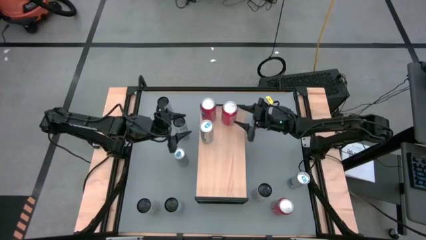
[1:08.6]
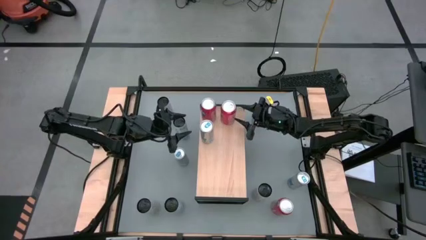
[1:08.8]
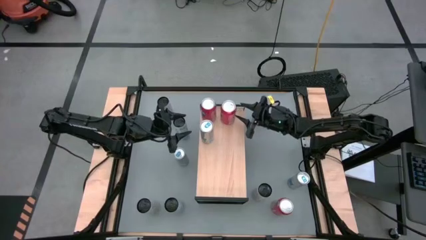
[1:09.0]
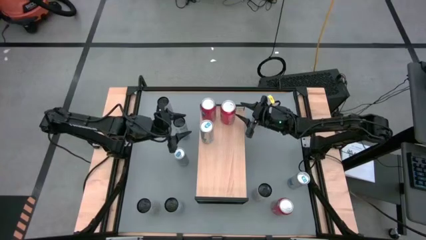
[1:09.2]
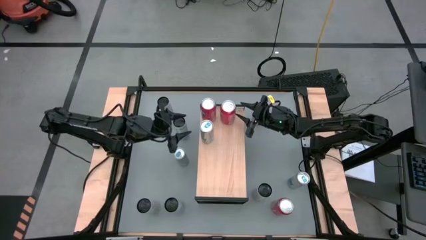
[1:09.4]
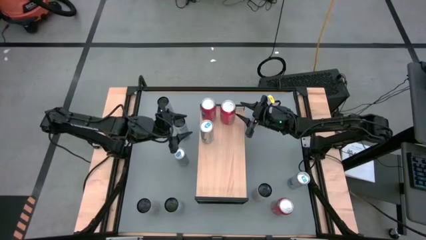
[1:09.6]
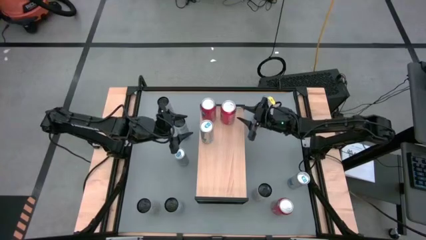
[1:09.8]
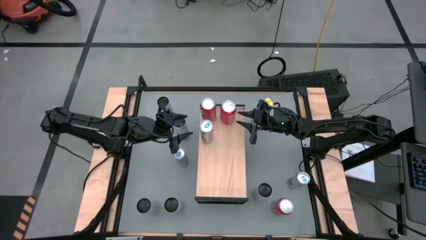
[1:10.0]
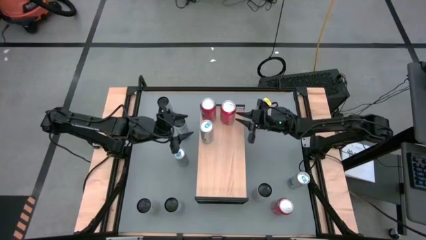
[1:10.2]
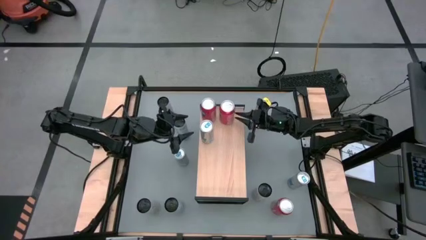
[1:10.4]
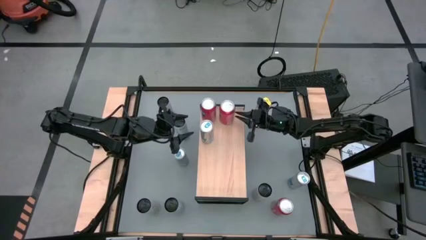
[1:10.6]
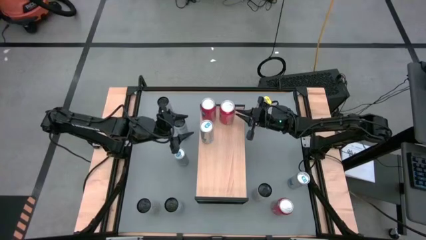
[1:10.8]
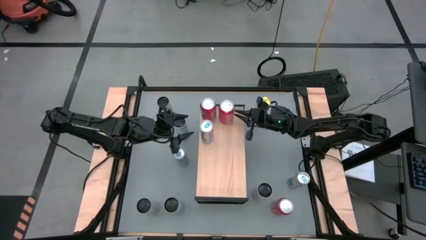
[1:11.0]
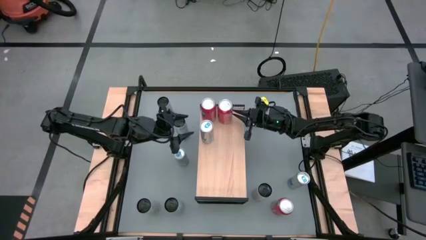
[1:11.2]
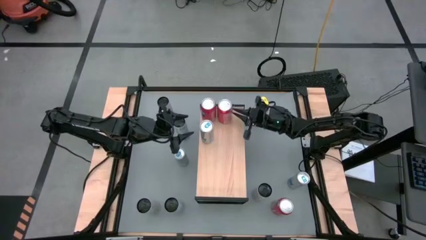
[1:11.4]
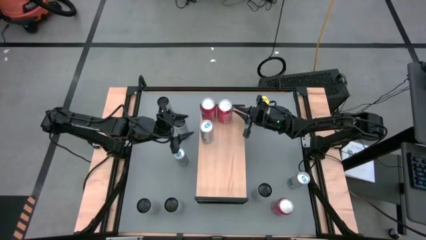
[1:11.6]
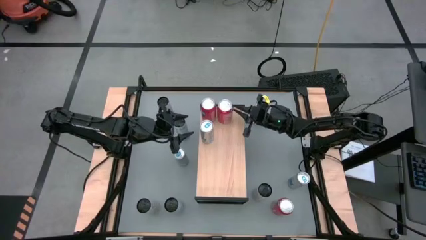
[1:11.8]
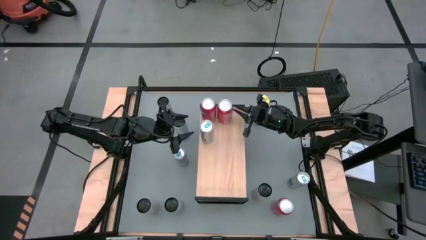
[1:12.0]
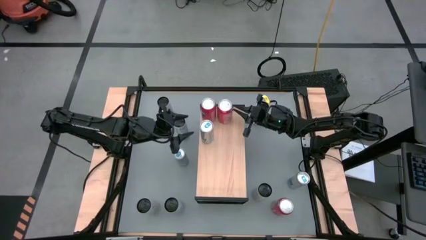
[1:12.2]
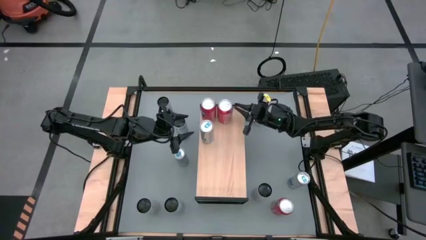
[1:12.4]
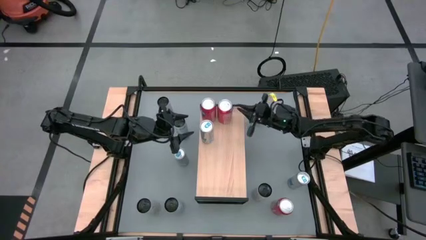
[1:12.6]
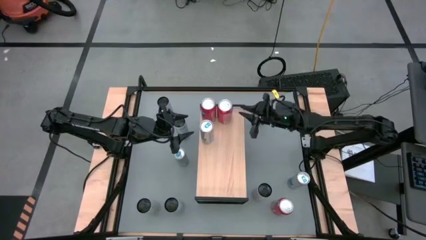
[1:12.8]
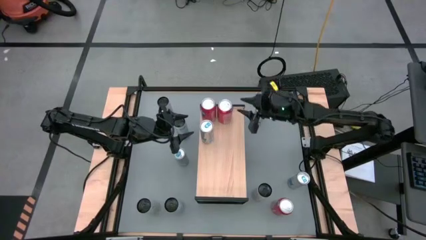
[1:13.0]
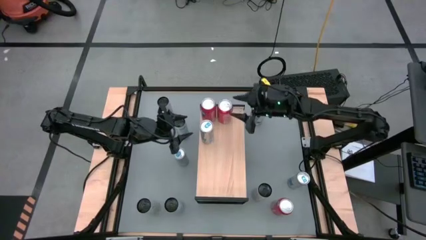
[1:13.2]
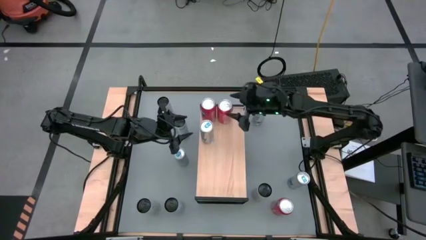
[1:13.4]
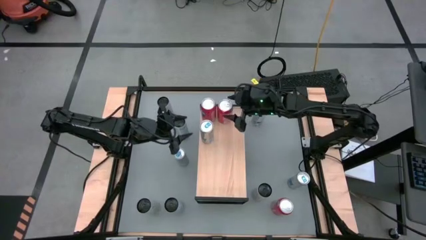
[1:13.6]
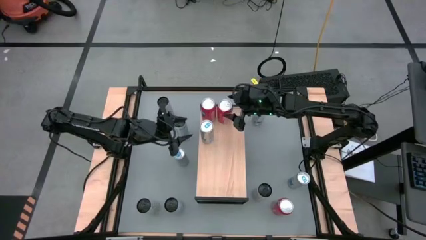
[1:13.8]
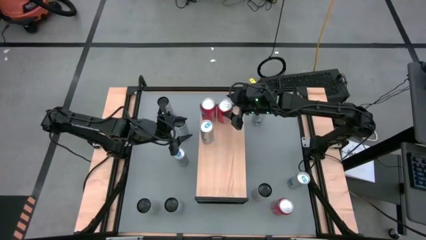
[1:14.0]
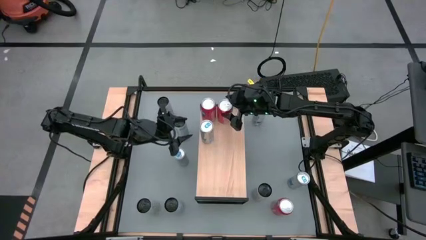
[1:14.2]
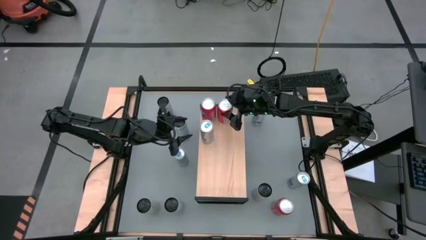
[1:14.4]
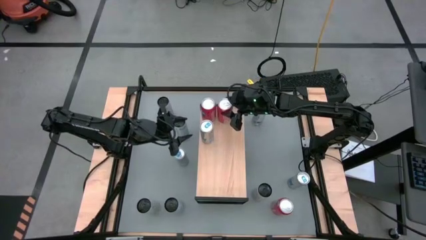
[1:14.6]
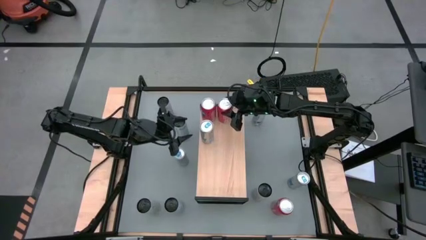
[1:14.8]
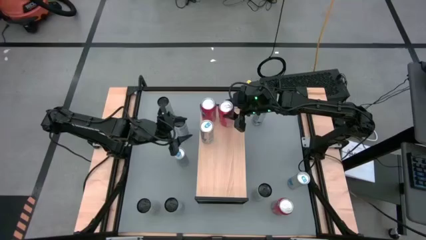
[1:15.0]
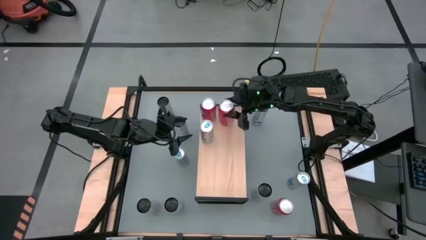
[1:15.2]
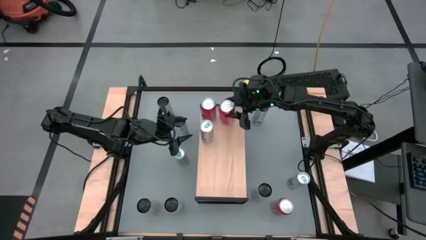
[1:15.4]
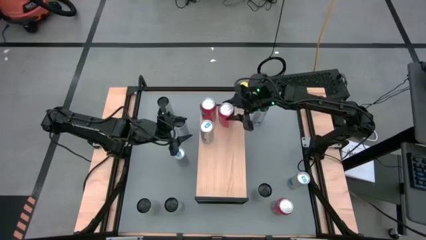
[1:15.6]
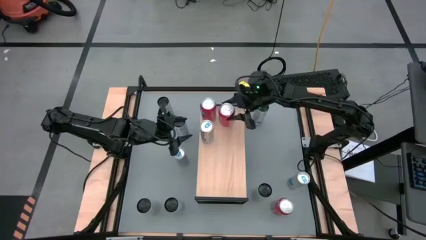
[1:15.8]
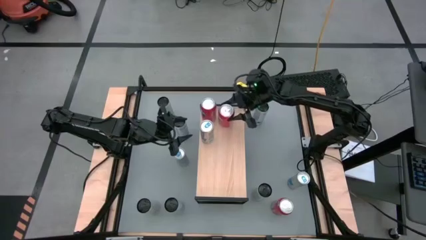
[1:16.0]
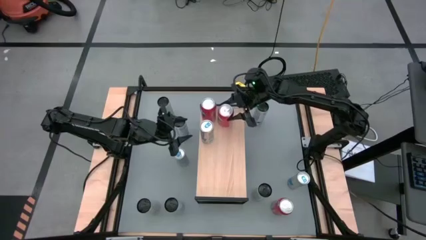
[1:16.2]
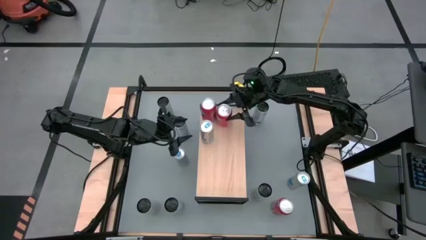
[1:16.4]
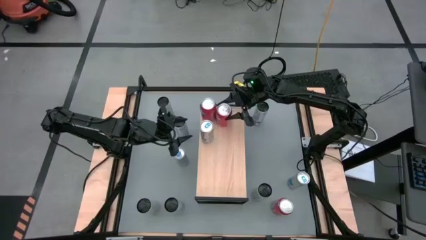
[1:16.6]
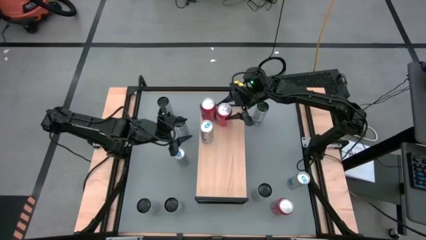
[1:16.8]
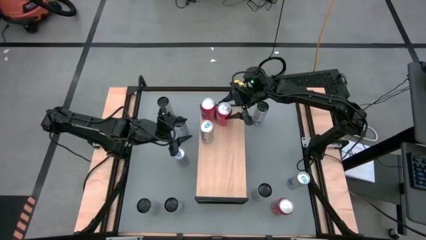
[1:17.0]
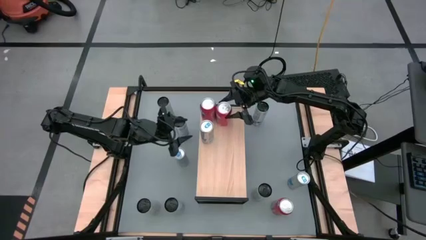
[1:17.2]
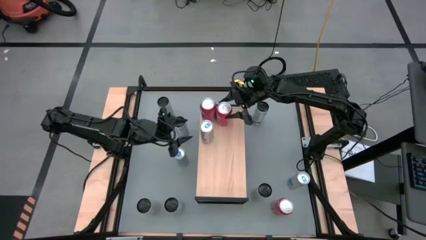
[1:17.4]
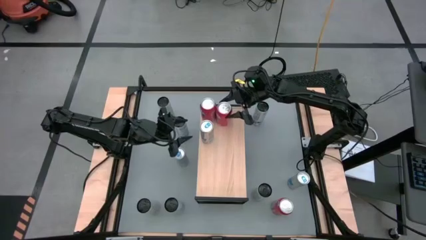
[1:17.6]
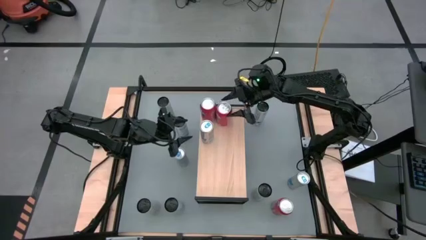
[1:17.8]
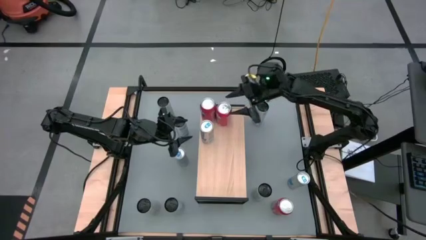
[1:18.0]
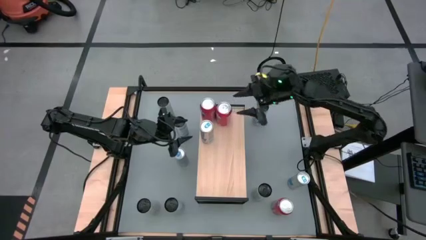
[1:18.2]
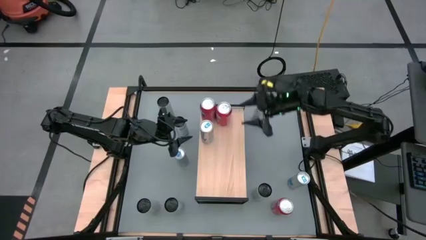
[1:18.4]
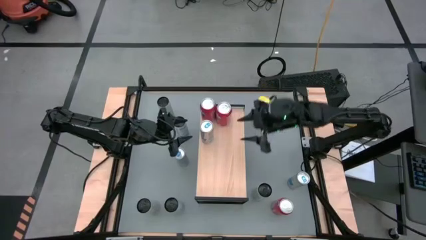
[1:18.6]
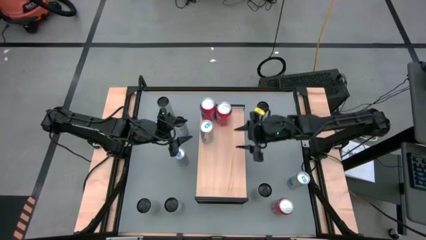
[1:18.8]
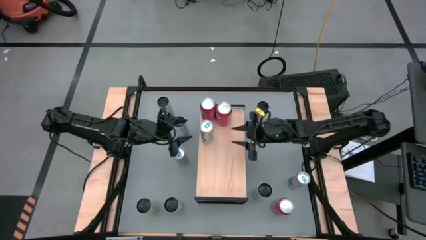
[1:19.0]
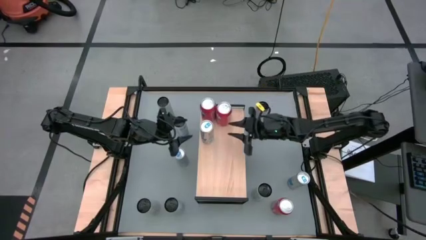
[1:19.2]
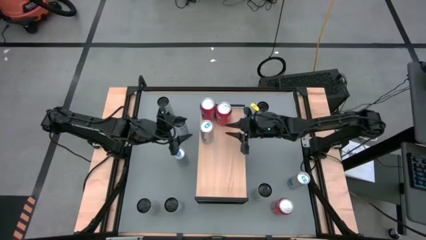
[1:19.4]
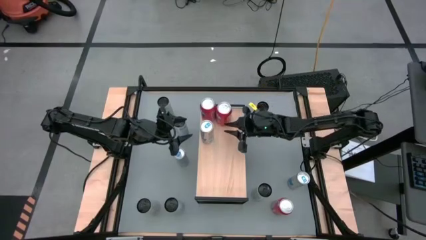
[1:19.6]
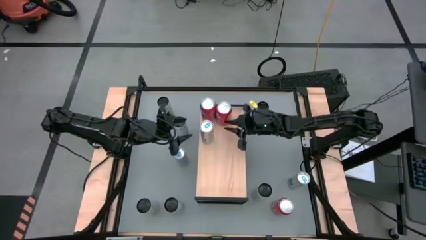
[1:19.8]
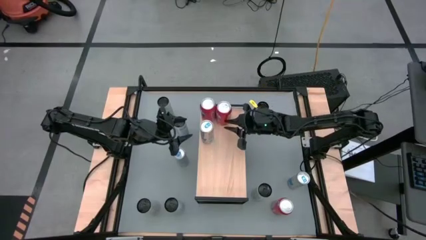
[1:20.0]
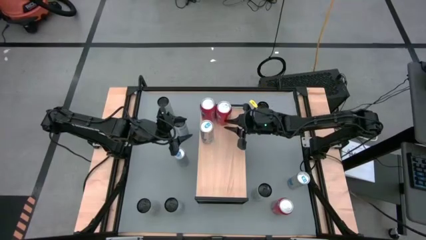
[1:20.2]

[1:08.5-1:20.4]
Task: Place canned beverage on shelf
Put the left orange soda can on the shelf
